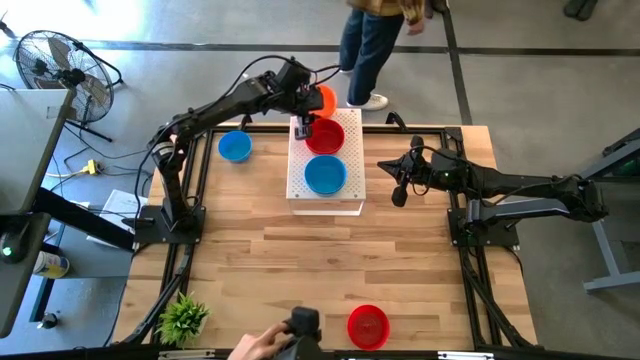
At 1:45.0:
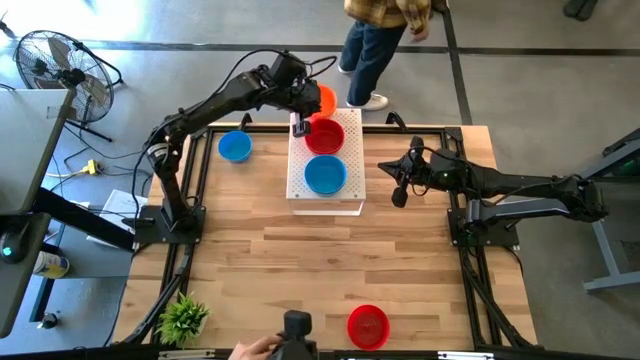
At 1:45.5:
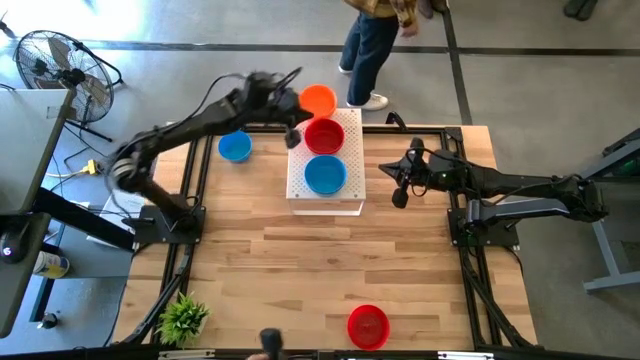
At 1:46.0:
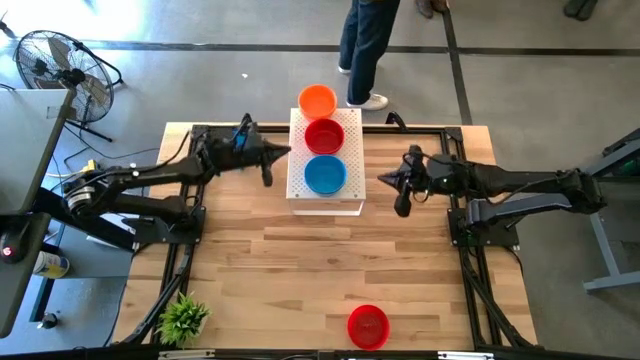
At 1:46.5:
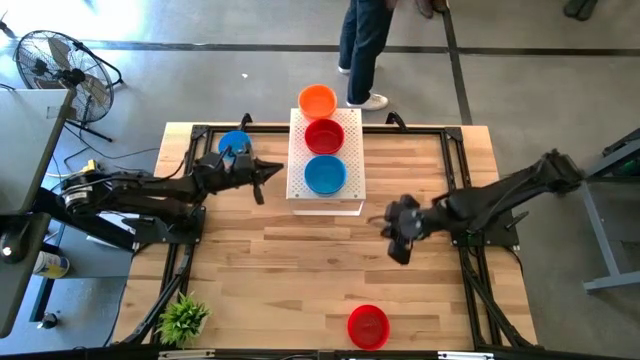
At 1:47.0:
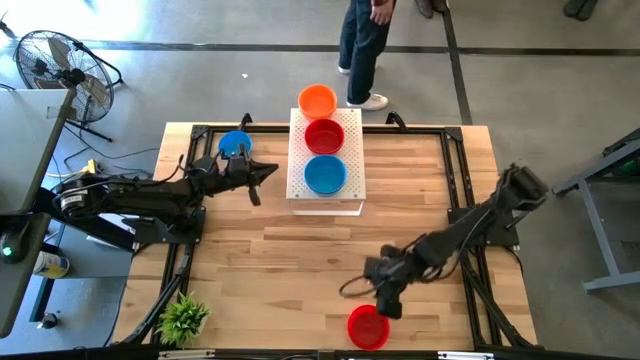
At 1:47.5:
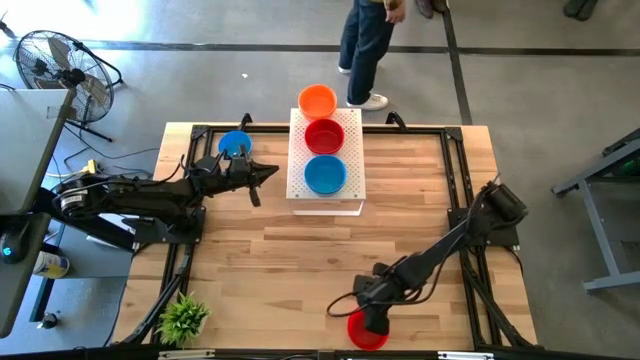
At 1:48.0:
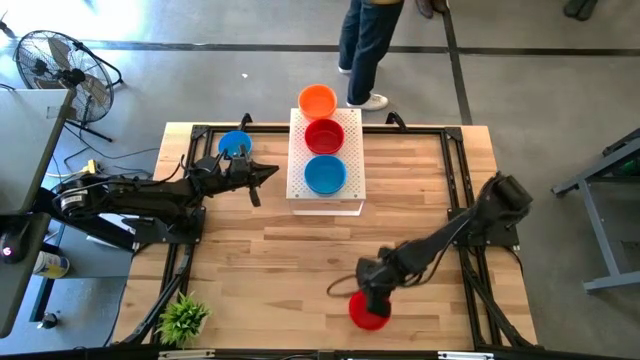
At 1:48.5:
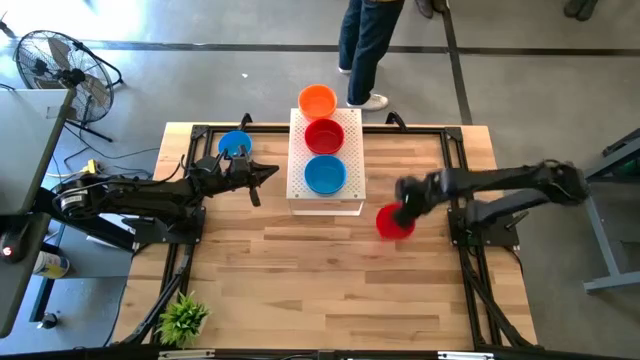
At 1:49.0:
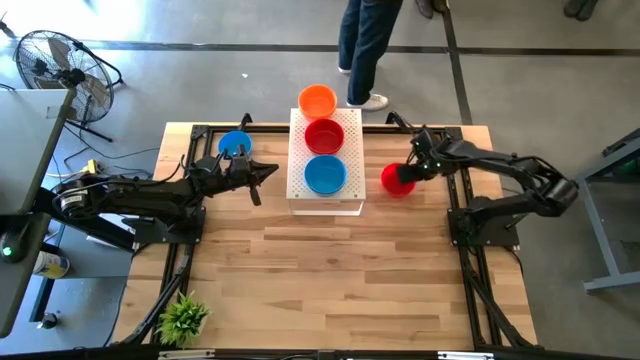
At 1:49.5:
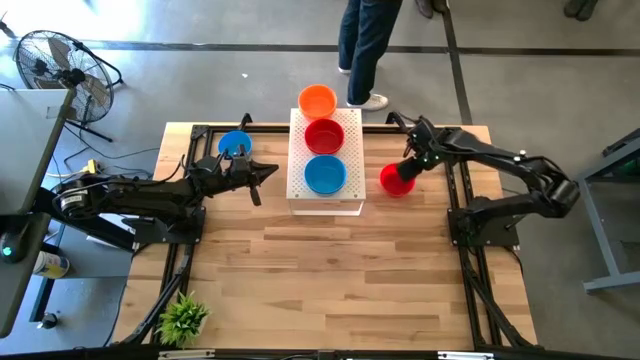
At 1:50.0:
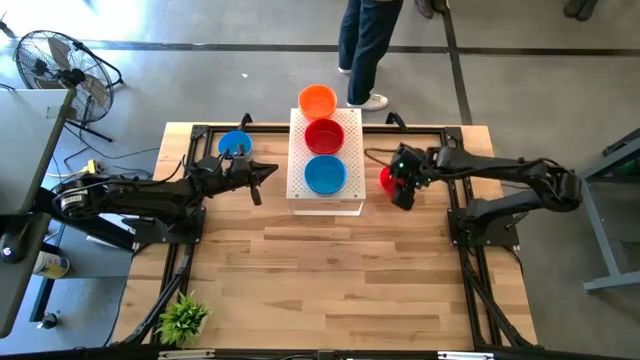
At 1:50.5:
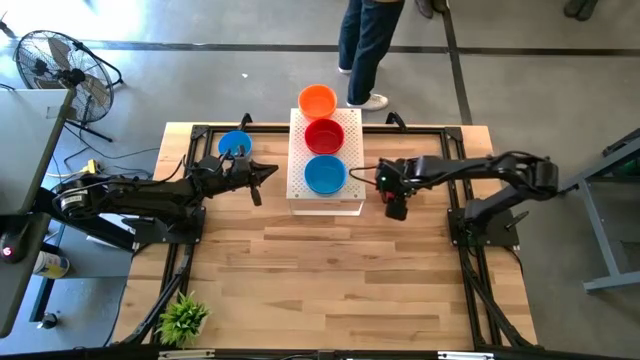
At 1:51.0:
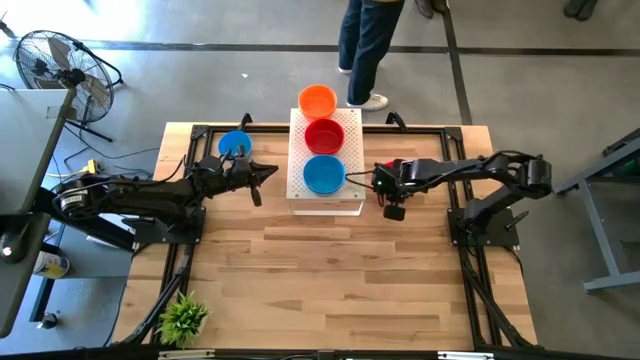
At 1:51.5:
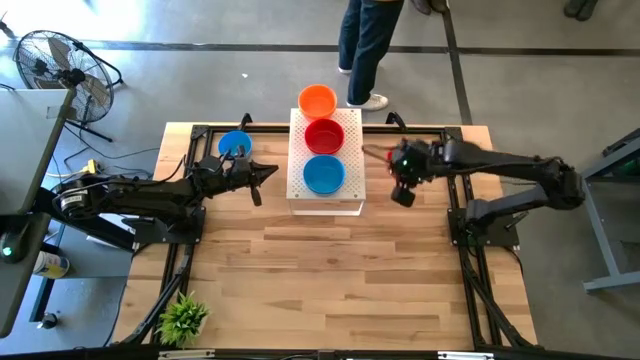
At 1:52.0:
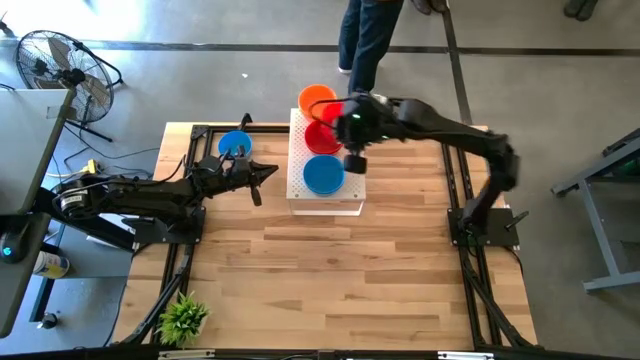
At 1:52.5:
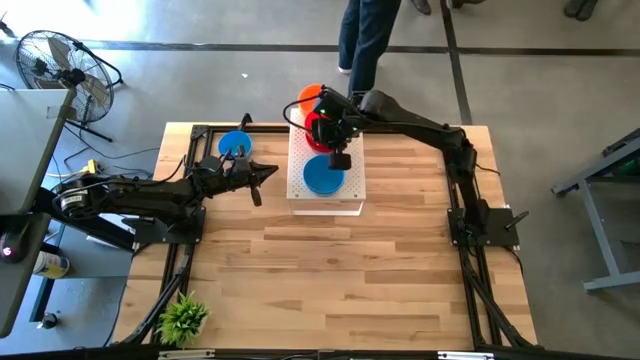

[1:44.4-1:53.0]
Task: Pick & Place Mini bowls
Stack the red bowl on top of the other red bowls on the shelf

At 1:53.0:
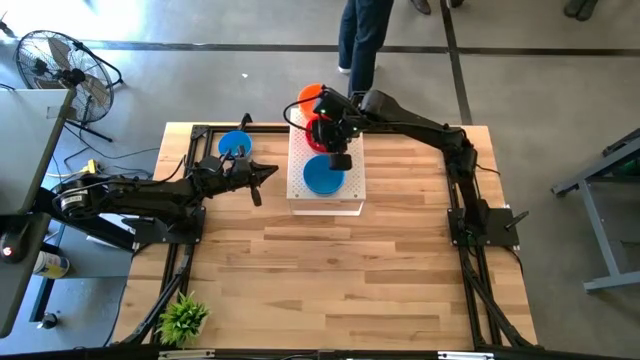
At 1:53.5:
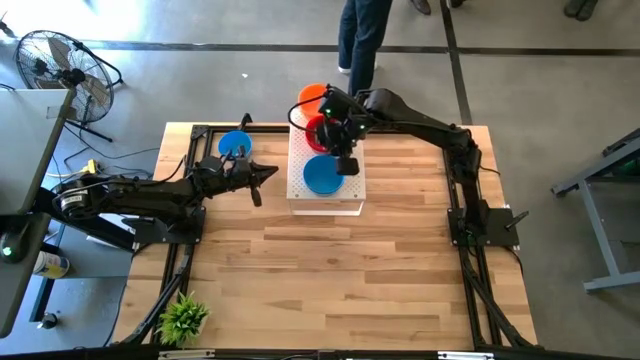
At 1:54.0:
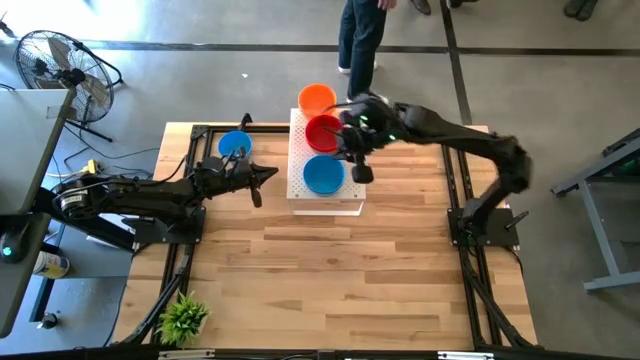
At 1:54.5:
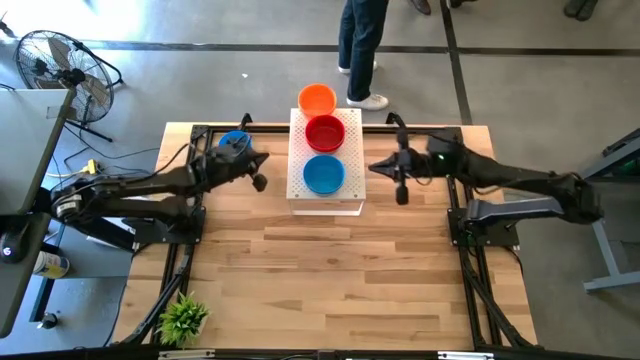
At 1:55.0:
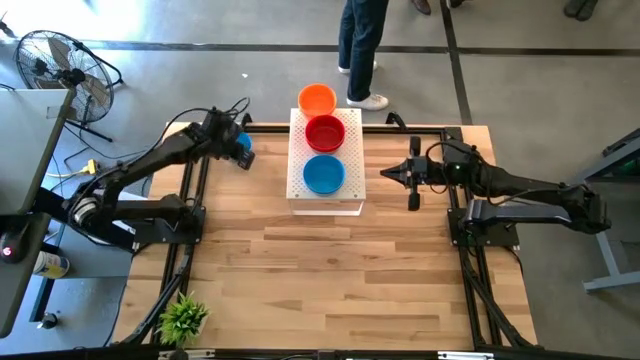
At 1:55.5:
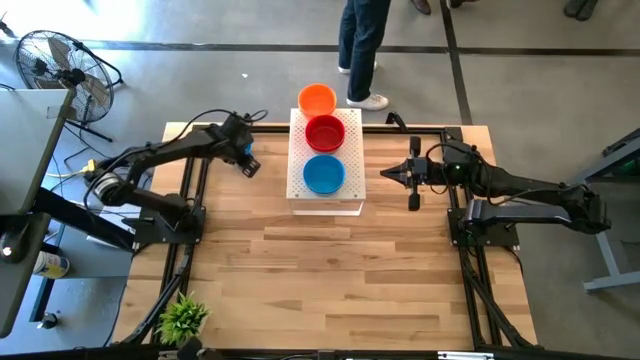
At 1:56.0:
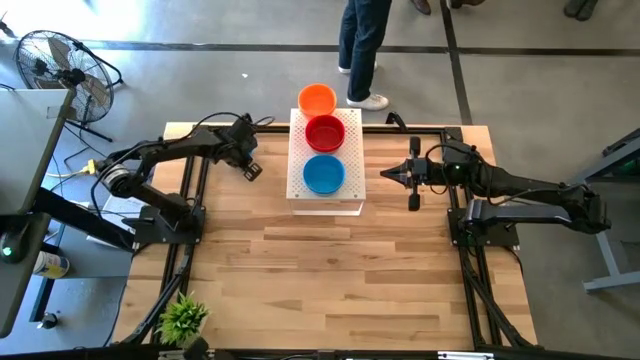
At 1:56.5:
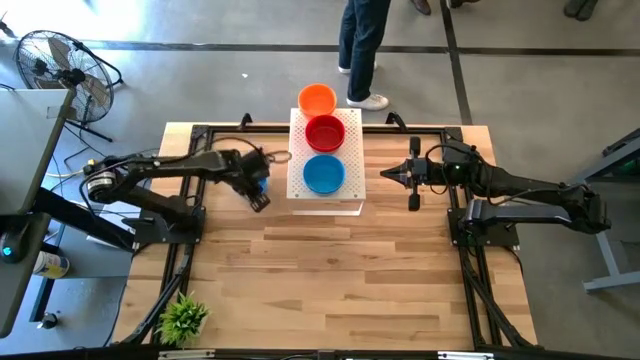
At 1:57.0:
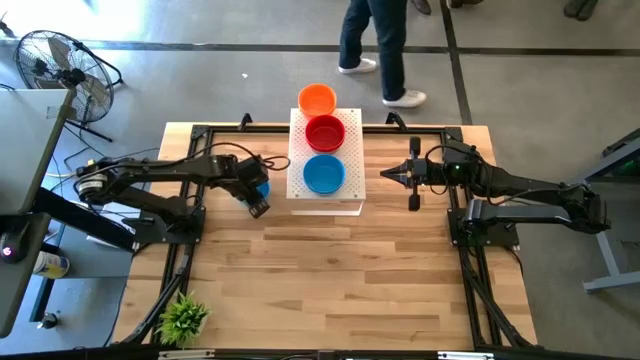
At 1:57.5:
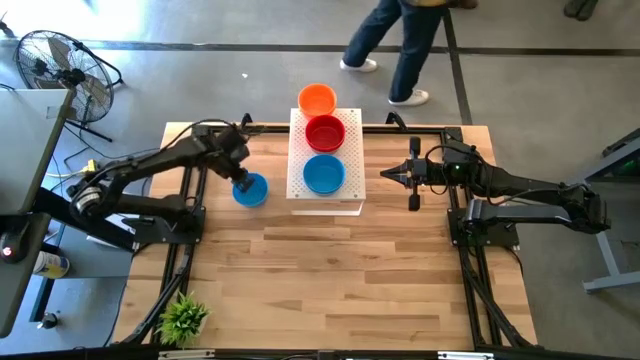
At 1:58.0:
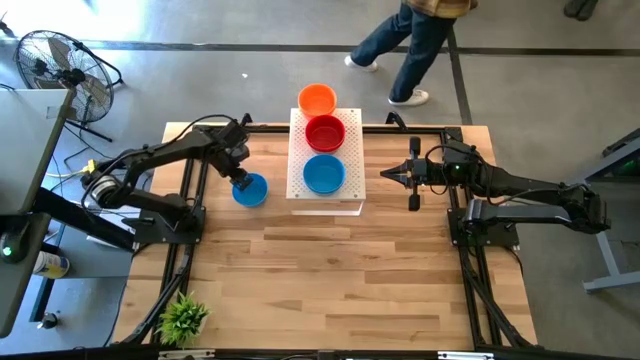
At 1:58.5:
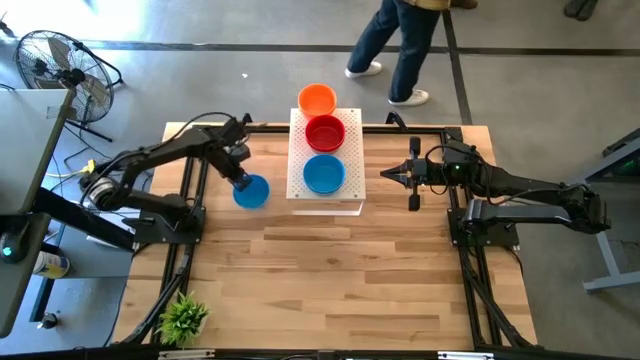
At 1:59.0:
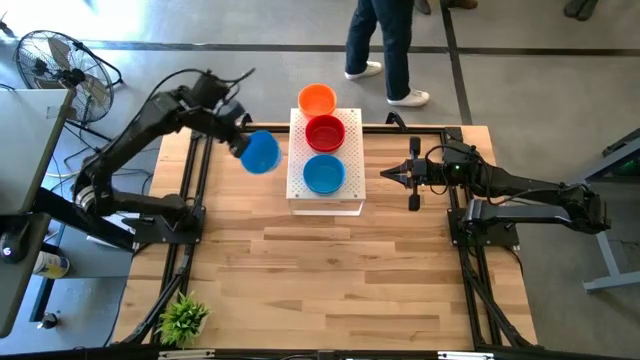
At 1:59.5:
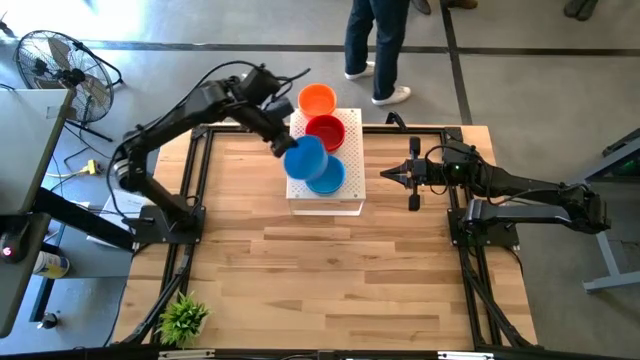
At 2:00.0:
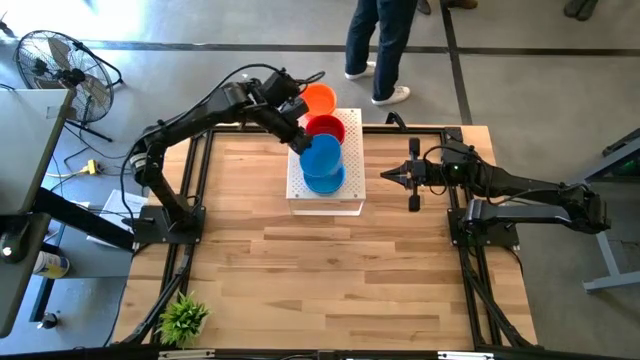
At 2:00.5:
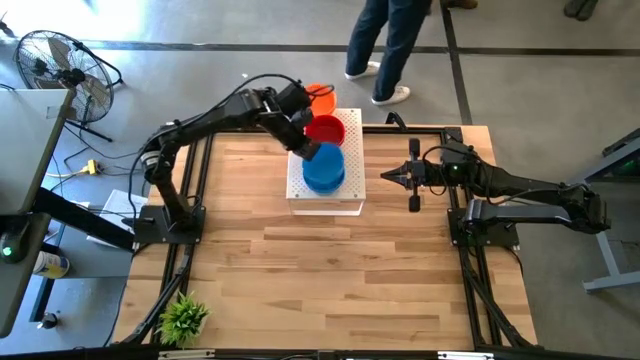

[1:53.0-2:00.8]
Stack the blue bowl on top of the other blue bowls on the shelf

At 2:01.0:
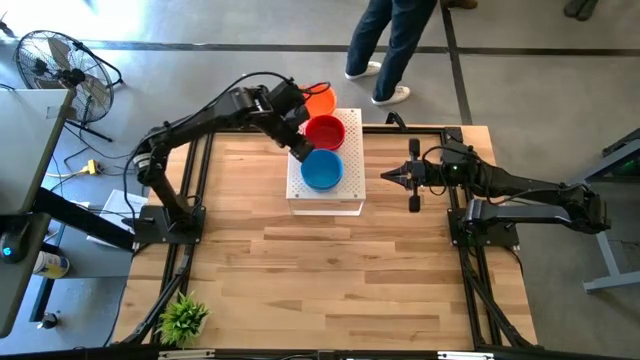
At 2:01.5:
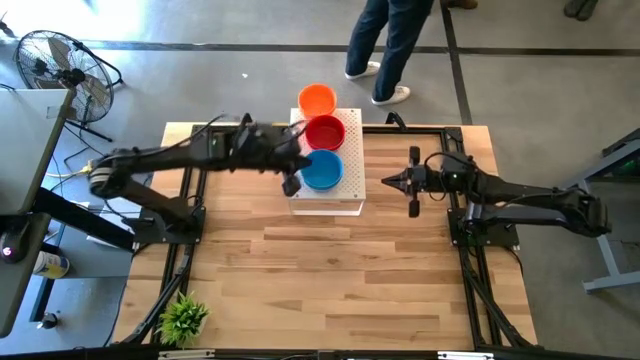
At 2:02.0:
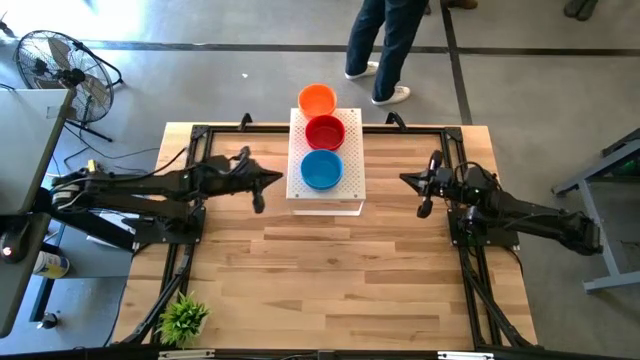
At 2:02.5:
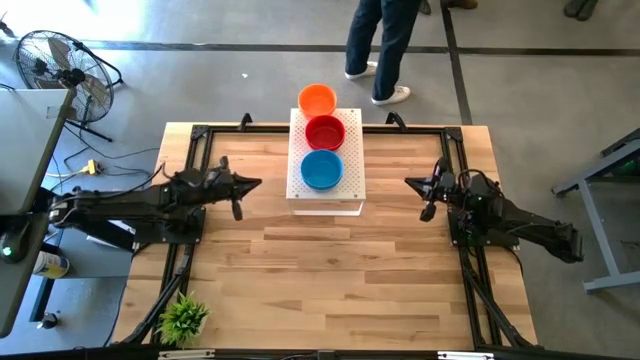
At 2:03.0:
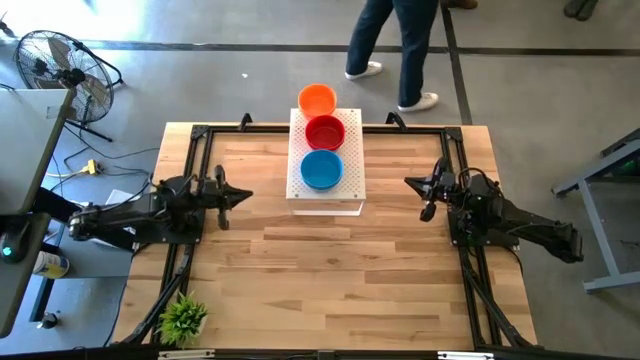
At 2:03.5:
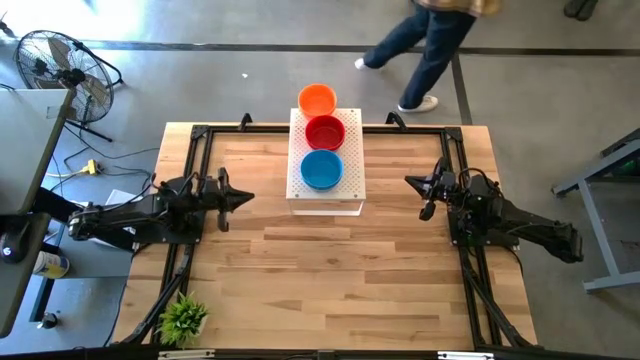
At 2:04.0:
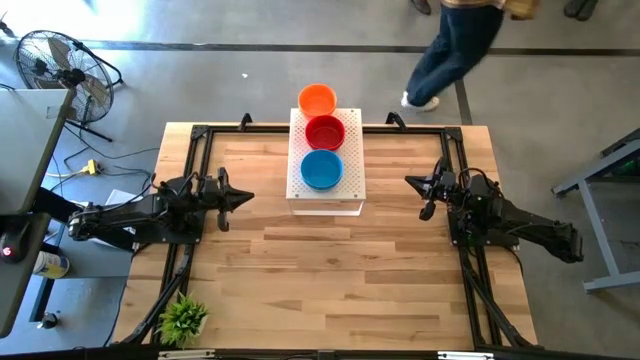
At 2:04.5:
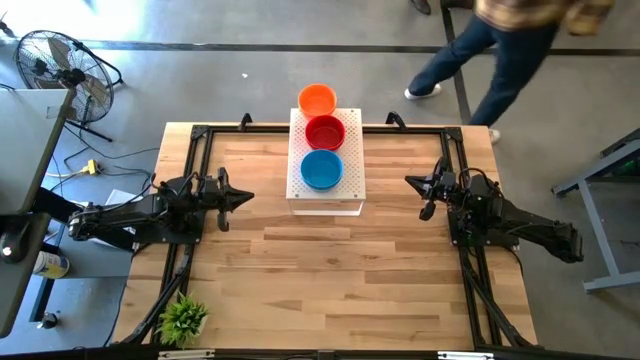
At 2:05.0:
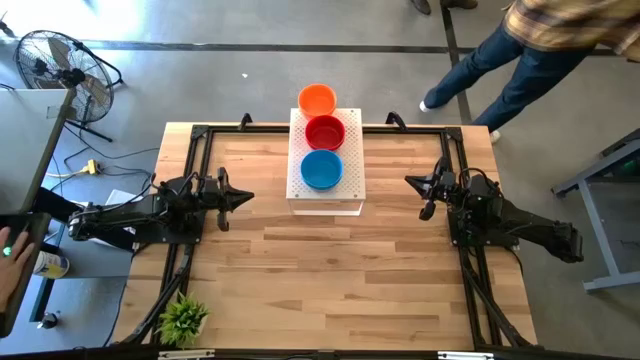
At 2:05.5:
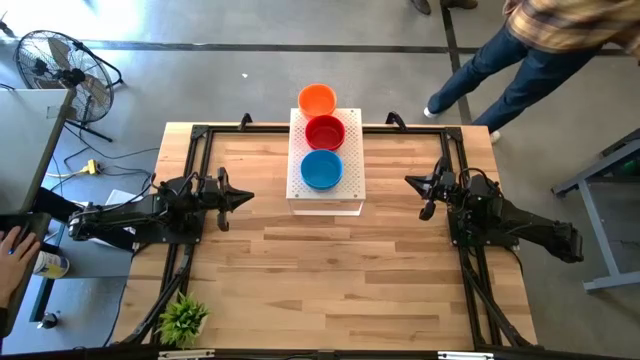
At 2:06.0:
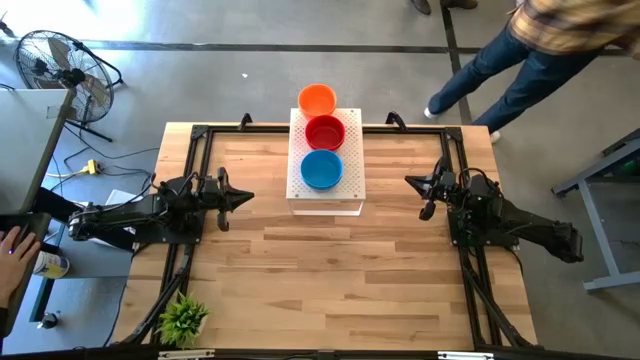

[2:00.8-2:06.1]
Return to Home Position
